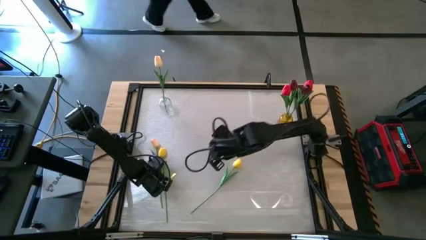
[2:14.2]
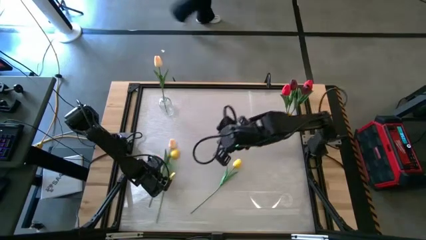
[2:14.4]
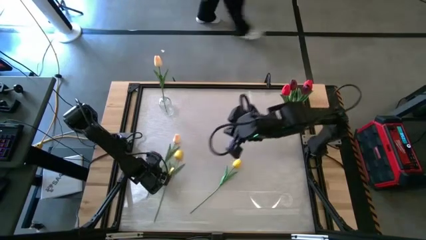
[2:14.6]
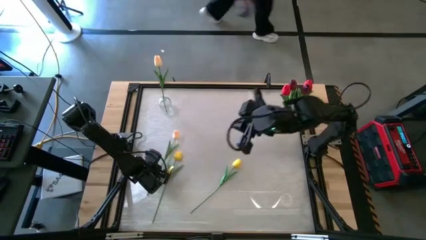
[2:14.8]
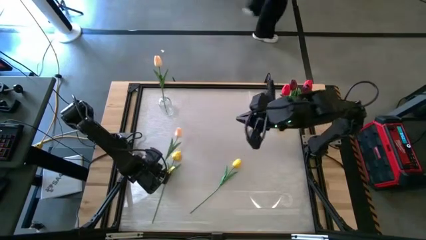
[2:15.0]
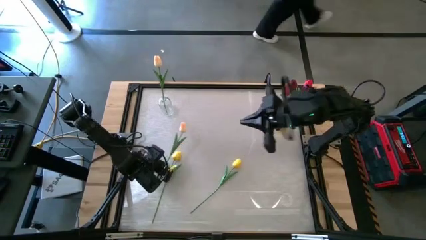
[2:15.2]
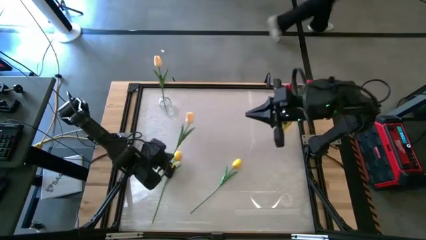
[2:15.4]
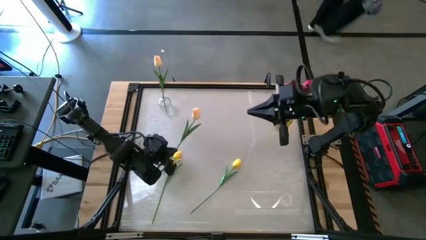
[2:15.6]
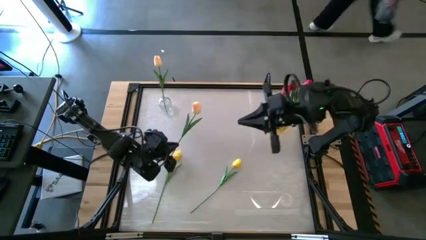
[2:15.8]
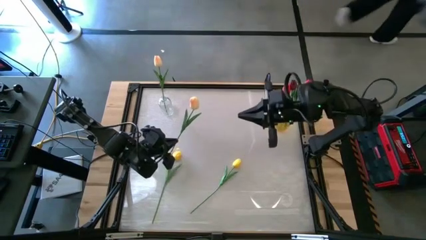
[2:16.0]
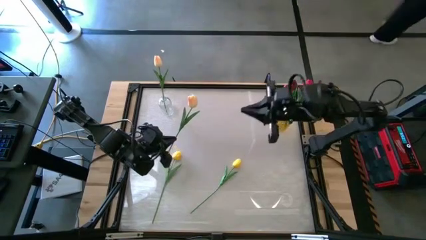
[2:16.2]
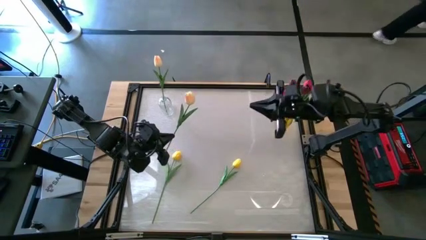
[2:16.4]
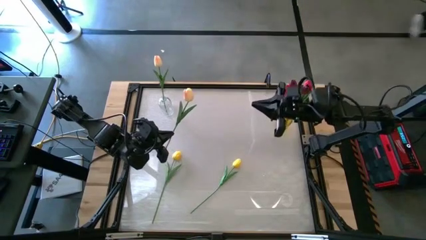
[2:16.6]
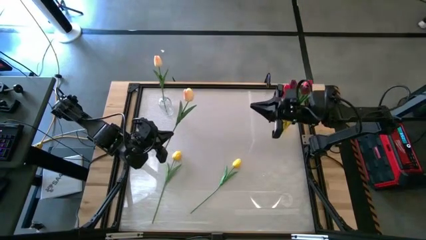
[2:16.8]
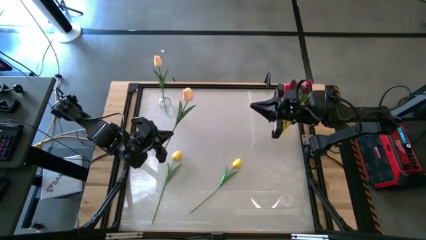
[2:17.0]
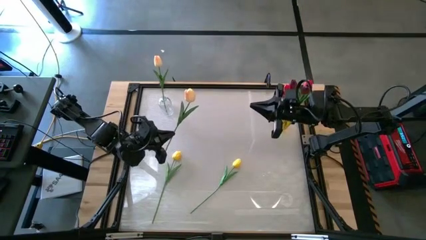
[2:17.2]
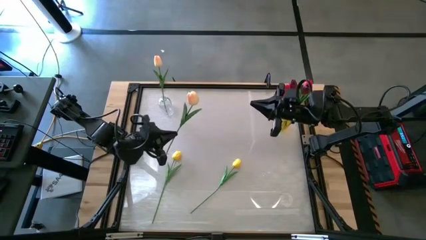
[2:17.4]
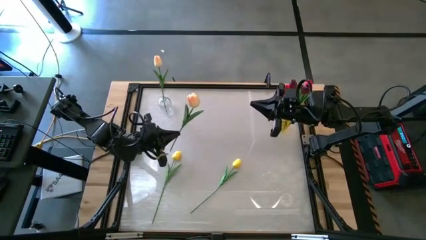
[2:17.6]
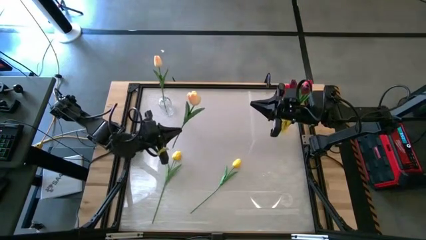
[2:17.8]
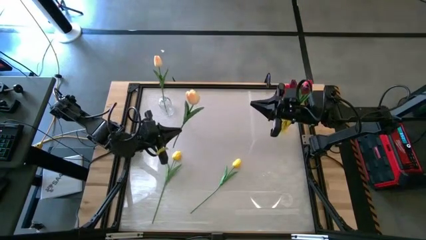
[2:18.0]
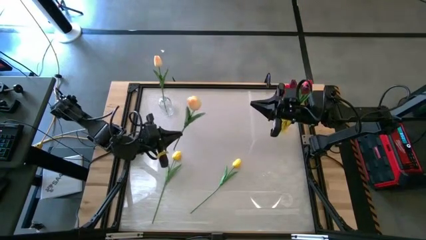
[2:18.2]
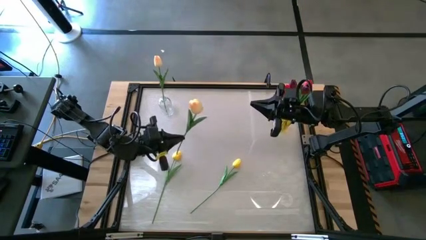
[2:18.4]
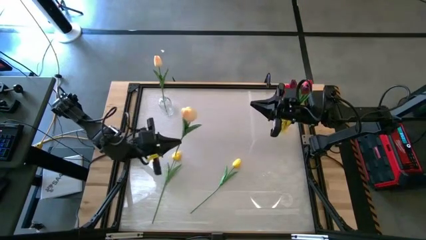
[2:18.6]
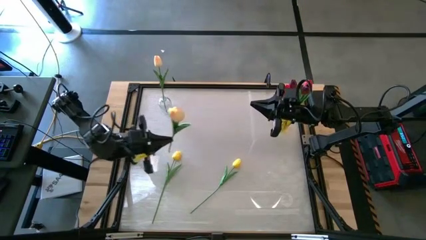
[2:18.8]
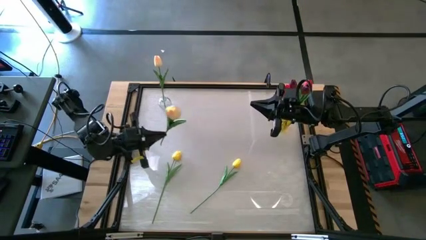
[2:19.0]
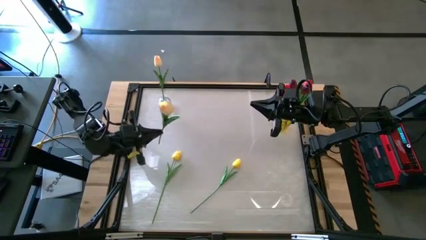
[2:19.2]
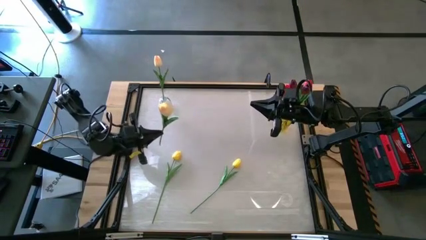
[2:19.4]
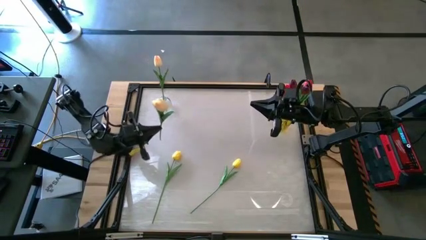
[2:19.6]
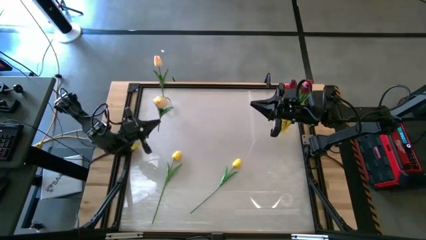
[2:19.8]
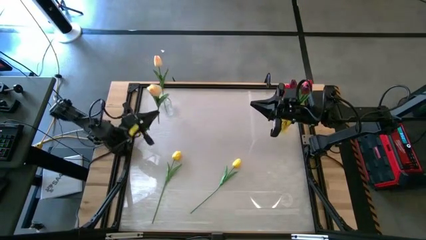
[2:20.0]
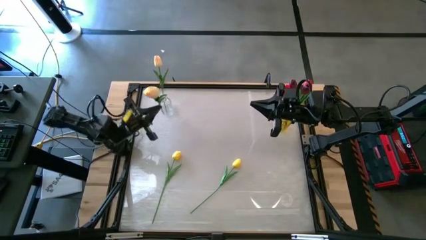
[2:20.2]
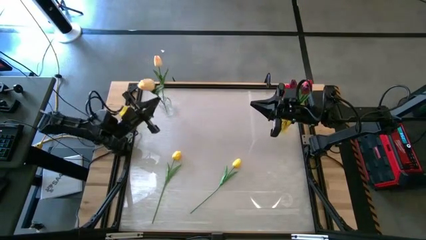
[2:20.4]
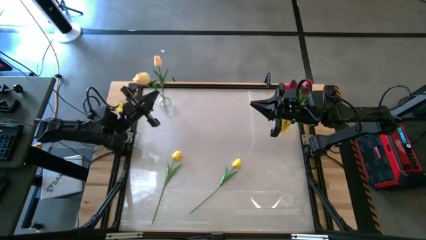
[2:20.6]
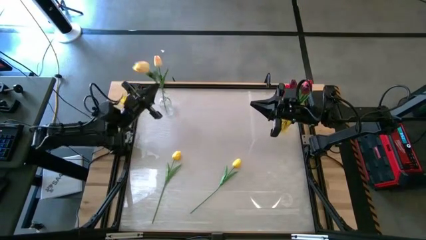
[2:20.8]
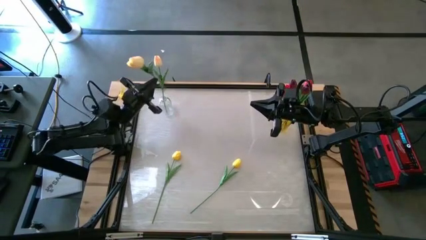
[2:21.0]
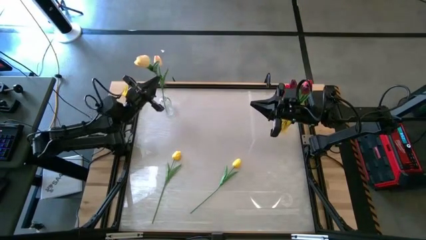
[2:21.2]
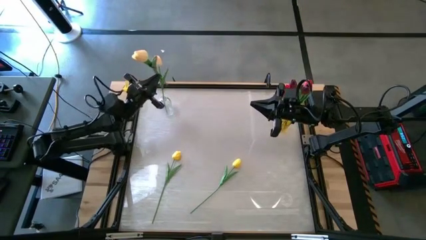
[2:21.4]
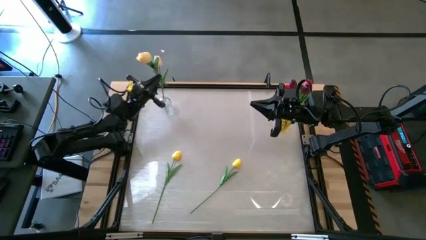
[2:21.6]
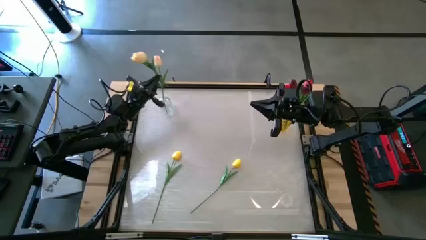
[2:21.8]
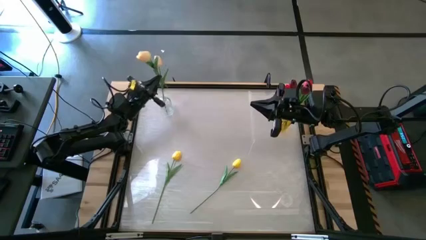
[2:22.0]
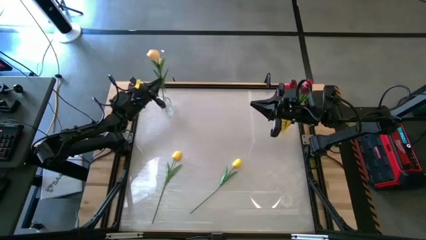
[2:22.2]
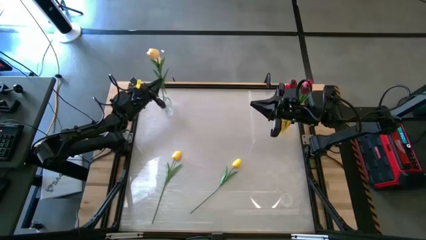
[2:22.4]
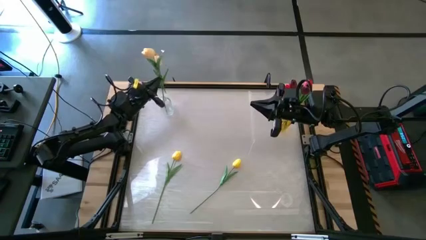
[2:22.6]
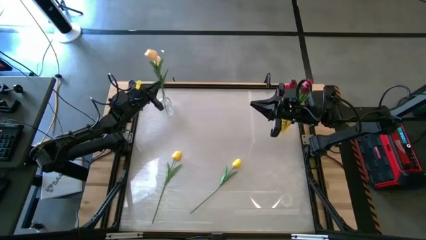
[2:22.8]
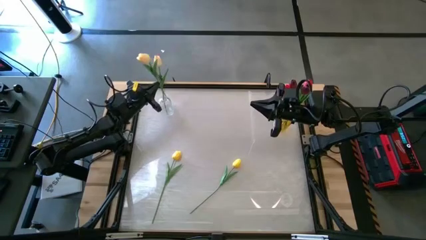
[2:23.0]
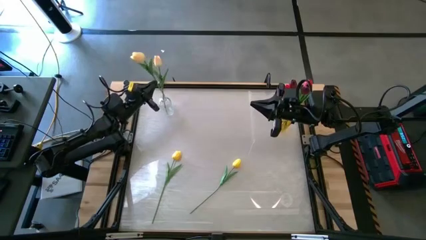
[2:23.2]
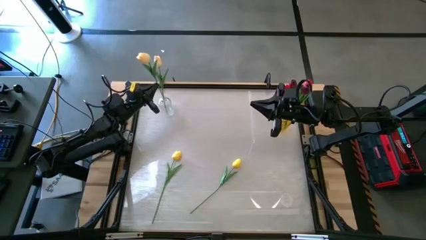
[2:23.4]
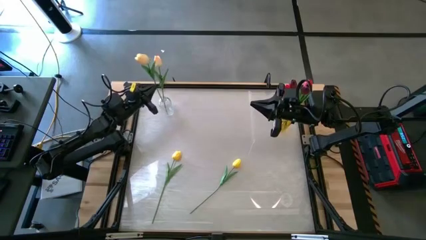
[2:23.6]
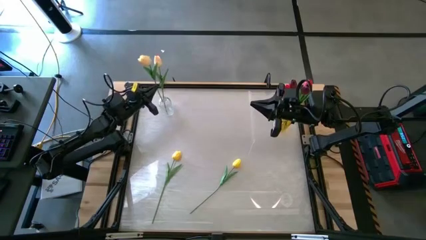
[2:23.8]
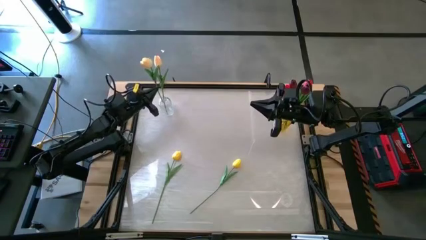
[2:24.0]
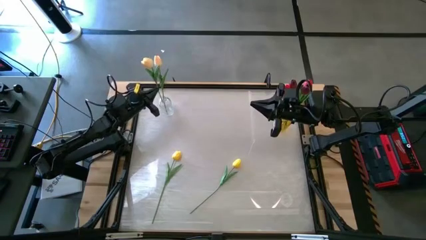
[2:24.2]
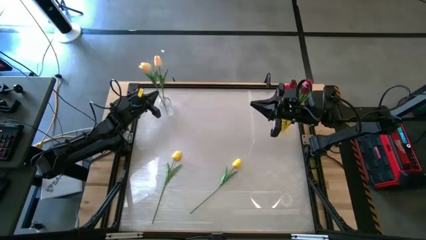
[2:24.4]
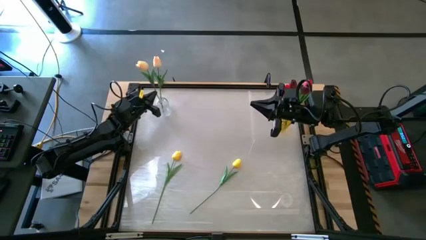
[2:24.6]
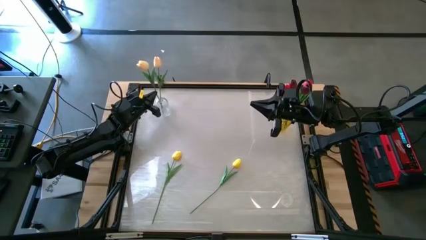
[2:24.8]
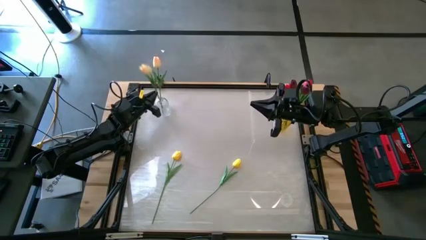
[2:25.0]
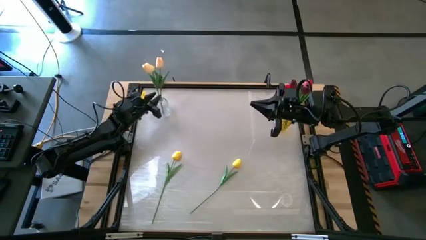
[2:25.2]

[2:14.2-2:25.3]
Task: Sort flowers into vase by color
Put the light pink tulip into the transparent vase

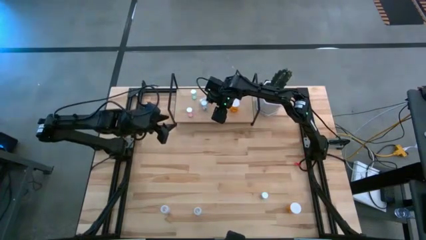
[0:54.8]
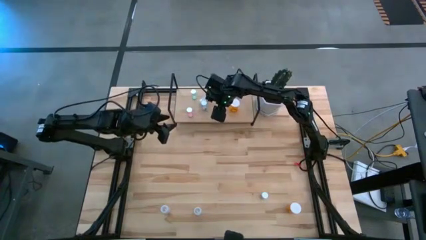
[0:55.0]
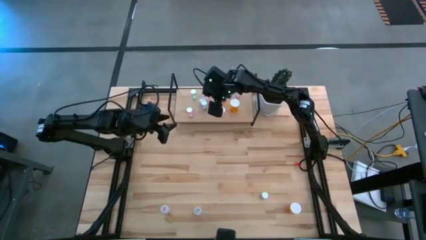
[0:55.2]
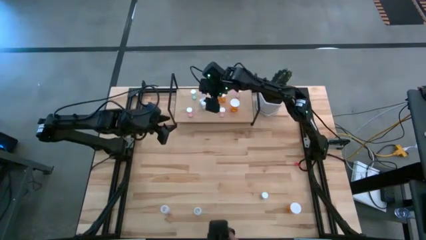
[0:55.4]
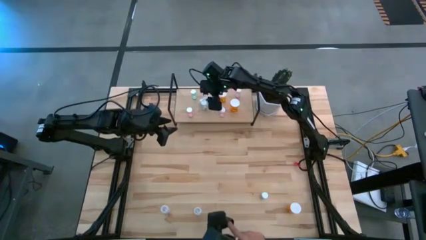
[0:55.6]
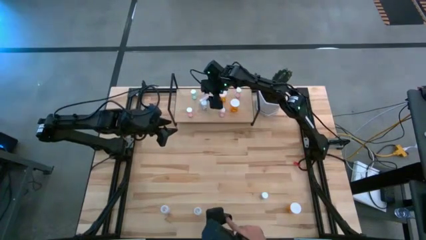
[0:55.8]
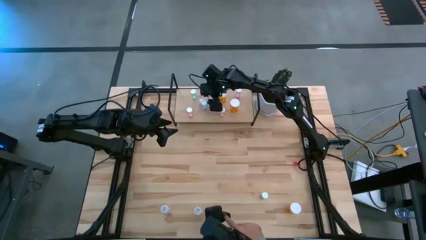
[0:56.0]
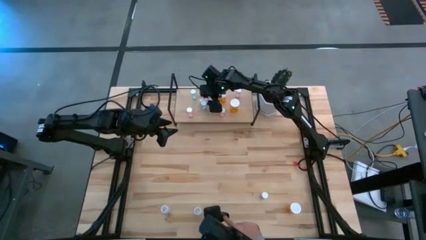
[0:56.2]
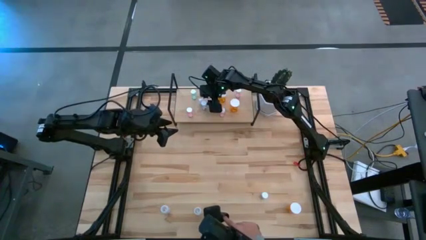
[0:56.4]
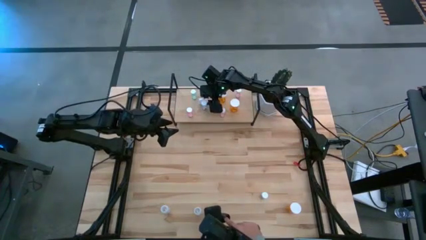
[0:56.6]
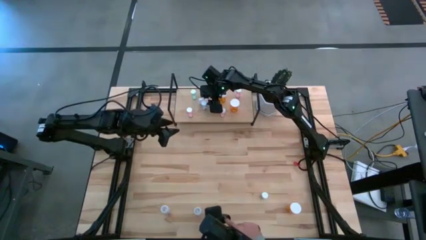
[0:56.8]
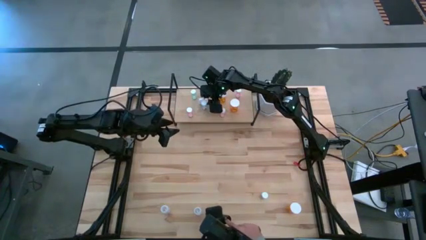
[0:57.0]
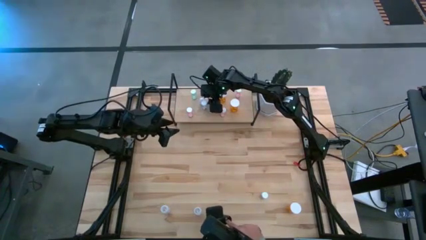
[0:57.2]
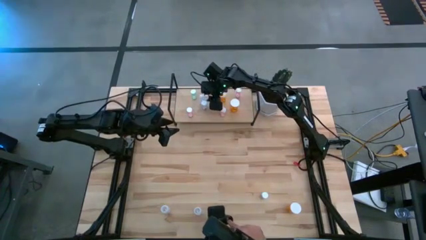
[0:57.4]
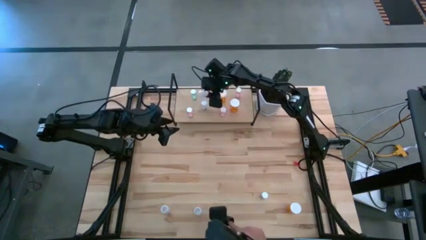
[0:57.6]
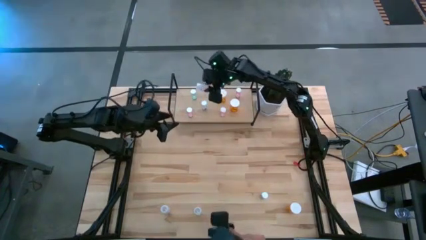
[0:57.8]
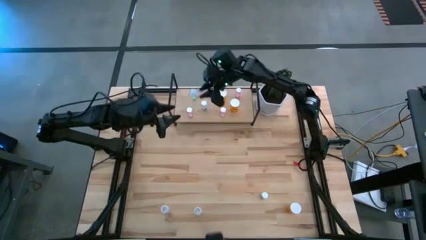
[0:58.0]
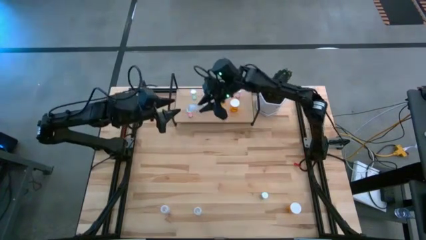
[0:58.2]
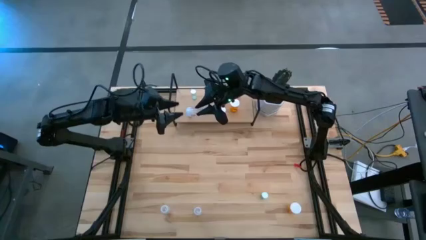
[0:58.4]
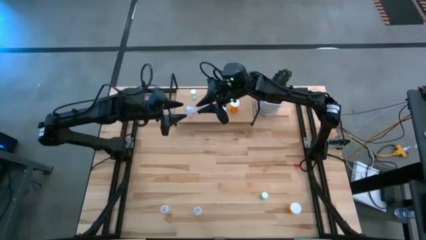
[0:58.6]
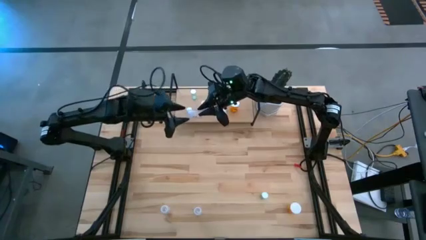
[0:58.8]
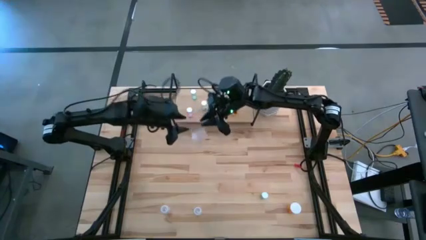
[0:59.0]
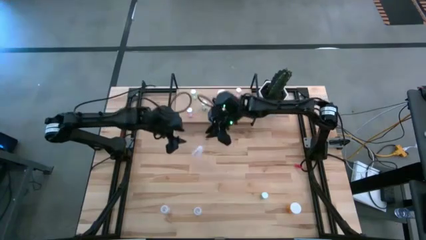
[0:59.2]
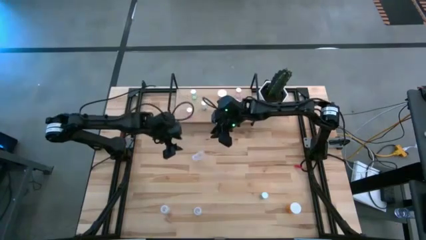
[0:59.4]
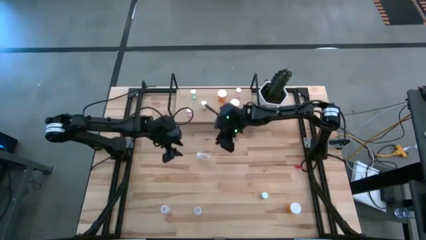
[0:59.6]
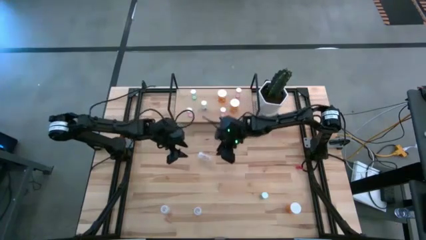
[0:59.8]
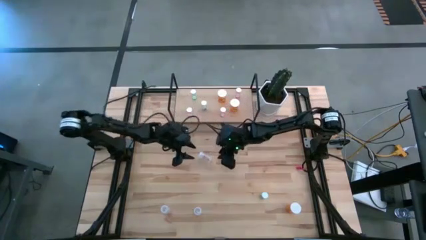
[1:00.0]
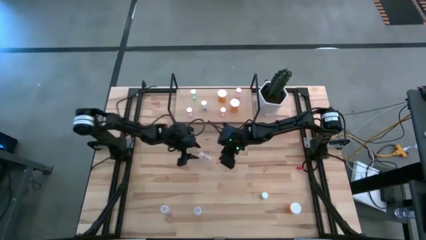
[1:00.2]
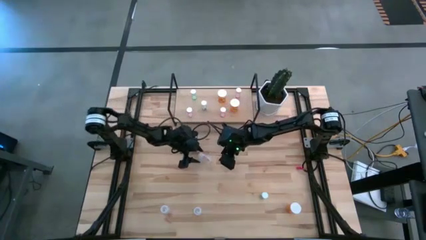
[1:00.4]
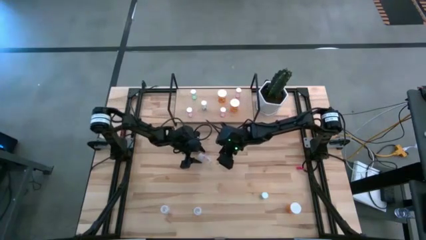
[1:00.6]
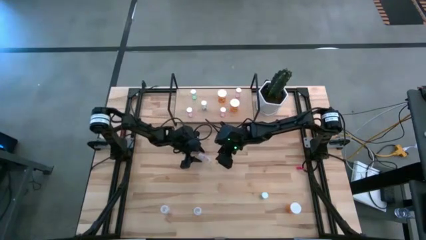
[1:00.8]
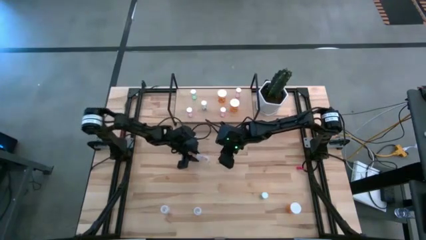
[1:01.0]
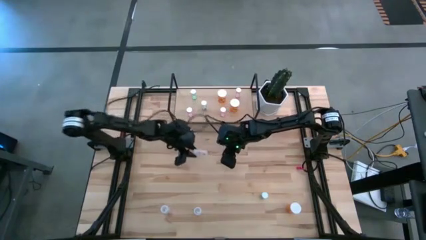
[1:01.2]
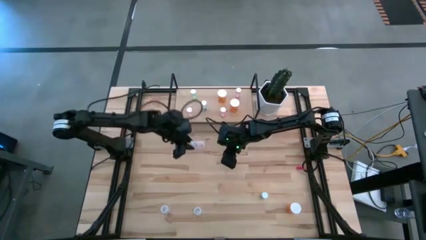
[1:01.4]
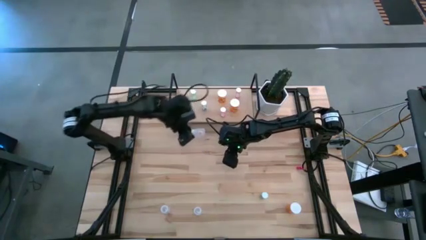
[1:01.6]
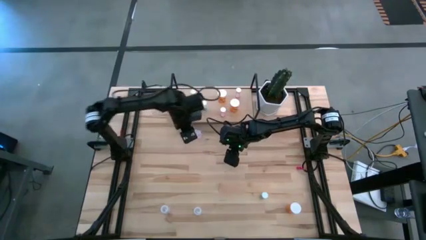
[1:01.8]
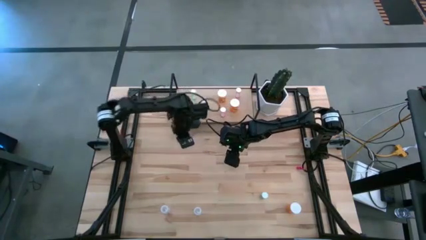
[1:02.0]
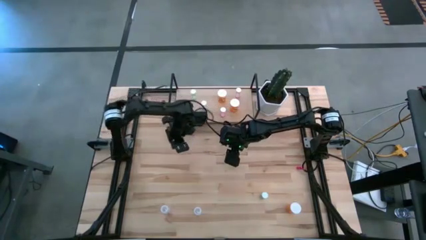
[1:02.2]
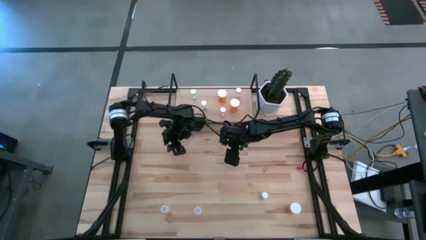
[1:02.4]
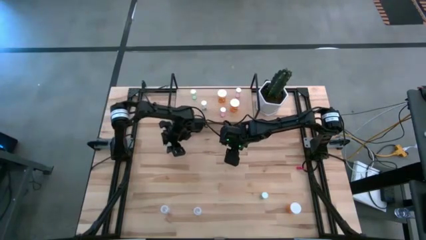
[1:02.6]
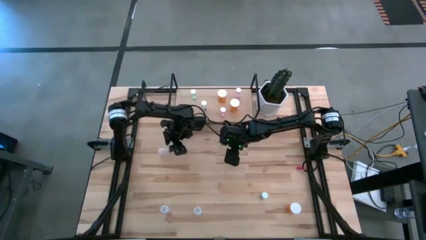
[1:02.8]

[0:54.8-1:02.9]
Task: Pick and place medicine bottles onto shelf by color
Adjust the transparent pill bottle on the shelf
